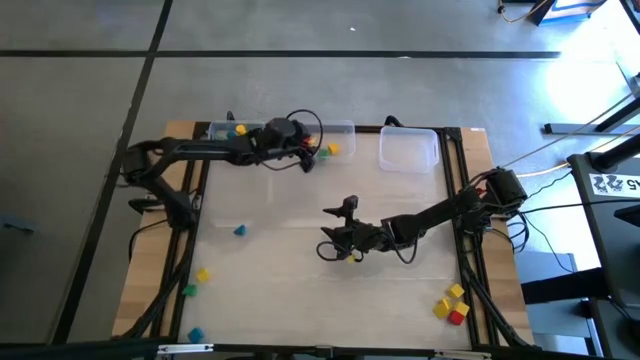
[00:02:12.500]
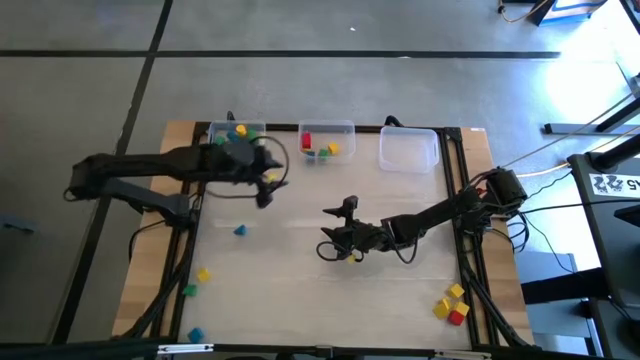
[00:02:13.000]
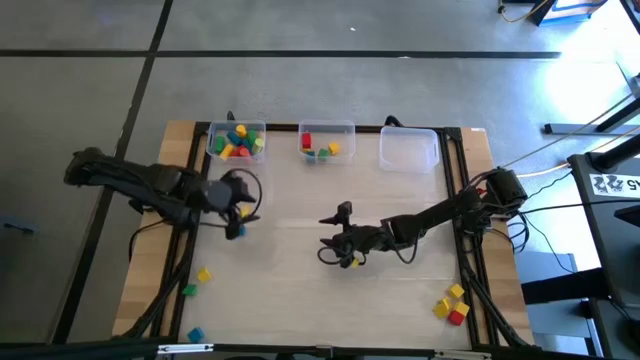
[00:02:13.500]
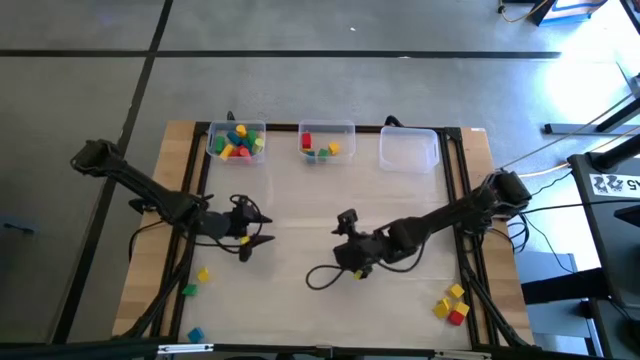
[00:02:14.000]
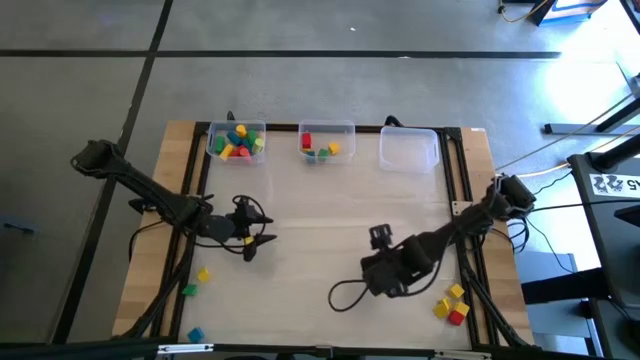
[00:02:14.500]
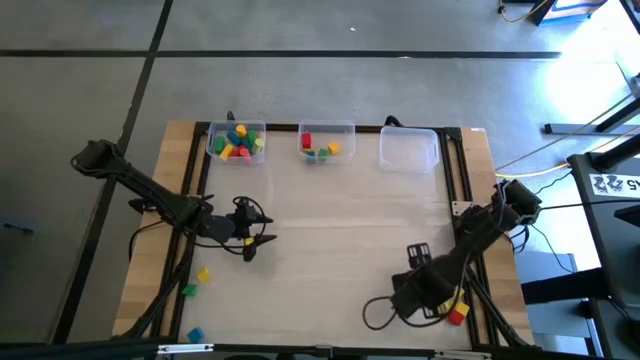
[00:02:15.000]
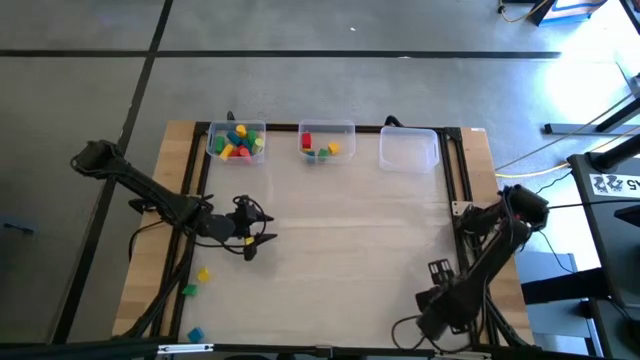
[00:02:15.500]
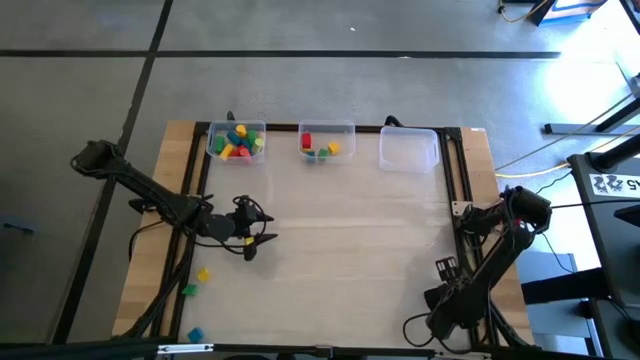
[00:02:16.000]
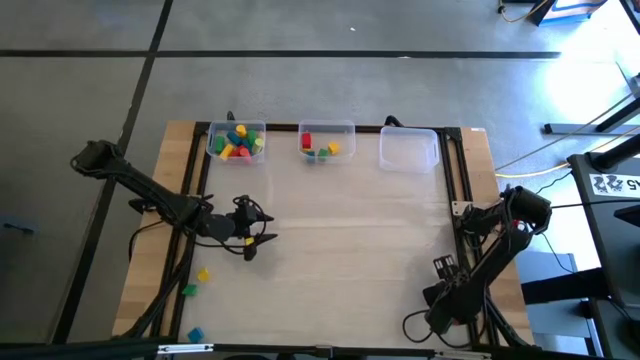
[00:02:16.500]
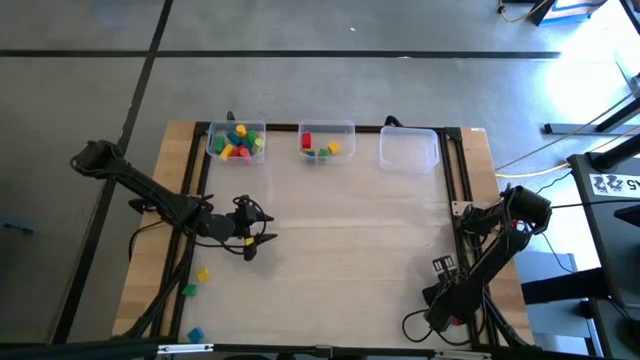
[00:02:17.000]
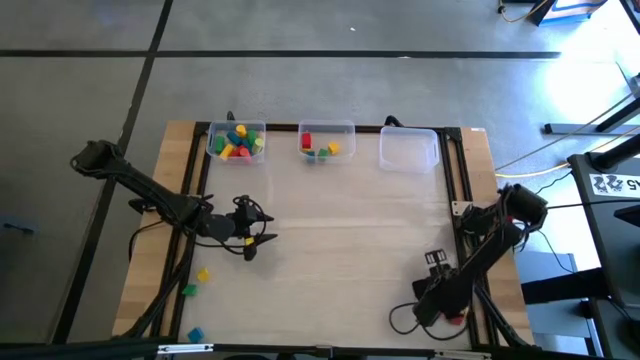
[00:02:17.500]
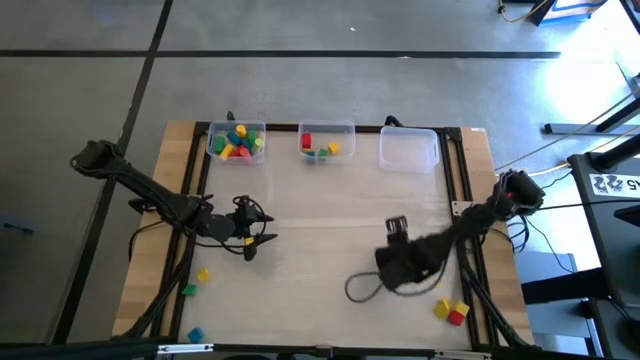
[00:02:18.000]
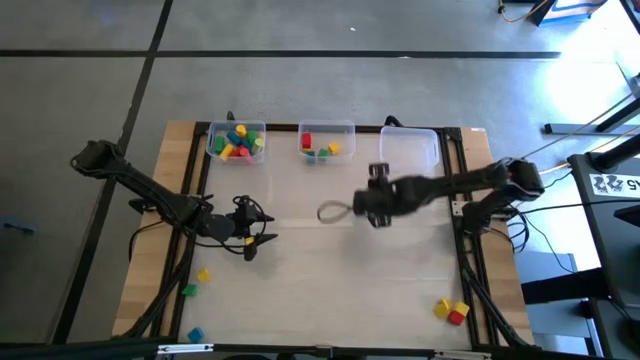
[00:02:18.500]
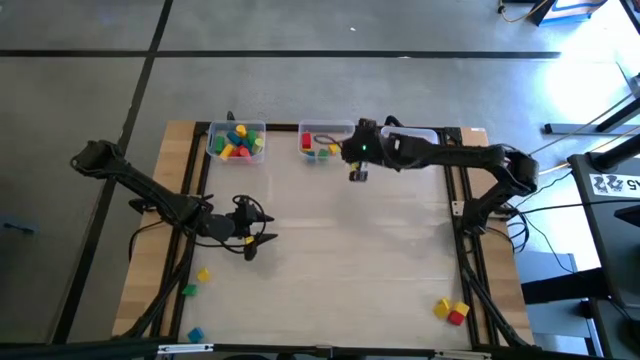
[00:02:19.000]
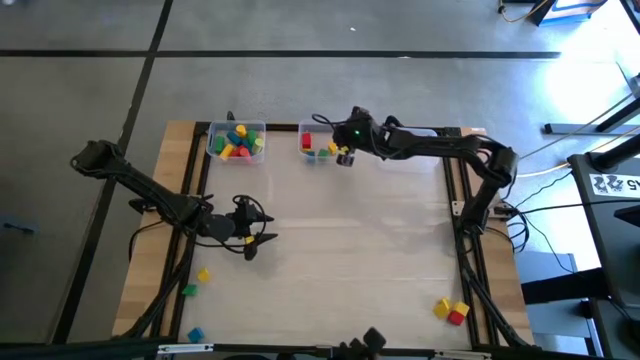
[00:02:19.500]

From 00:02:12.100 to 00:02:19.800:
Task: Sort blocks by size
Put the square yellow block into the middle transparent bin

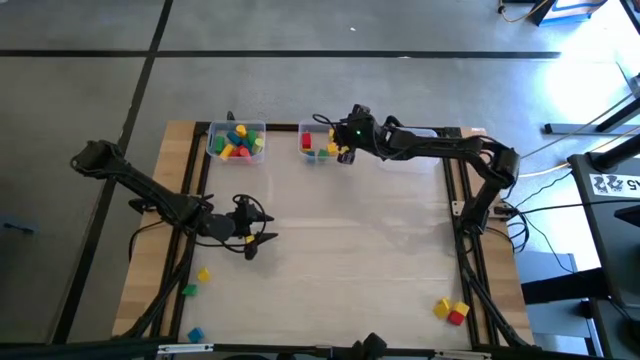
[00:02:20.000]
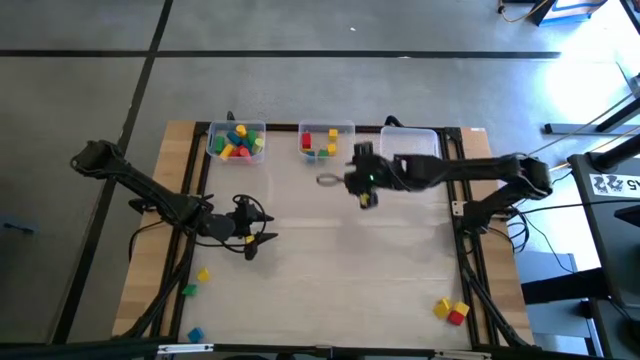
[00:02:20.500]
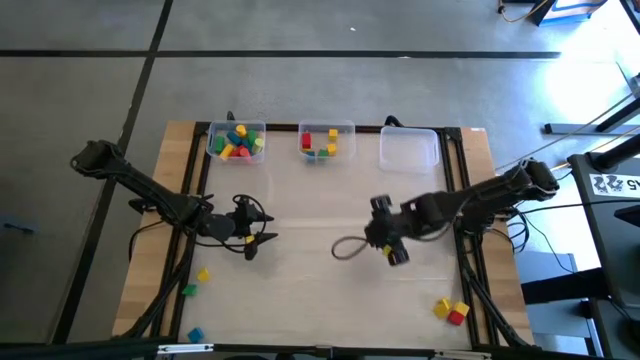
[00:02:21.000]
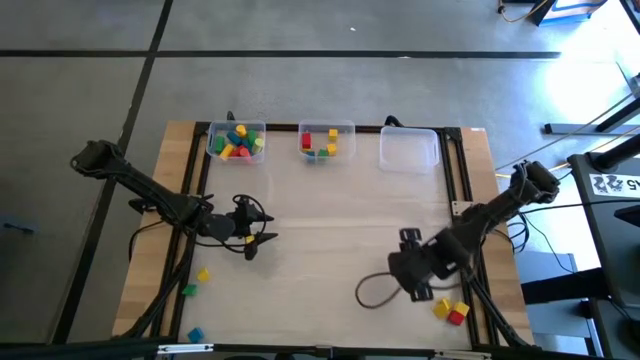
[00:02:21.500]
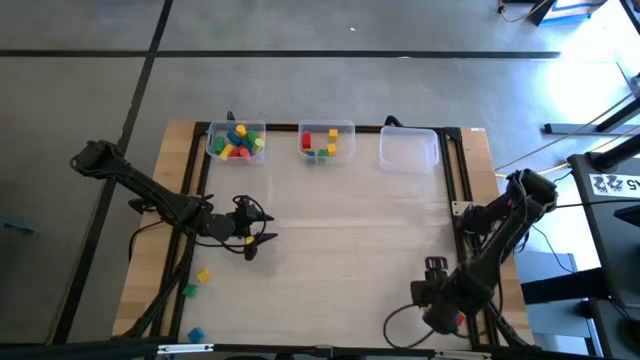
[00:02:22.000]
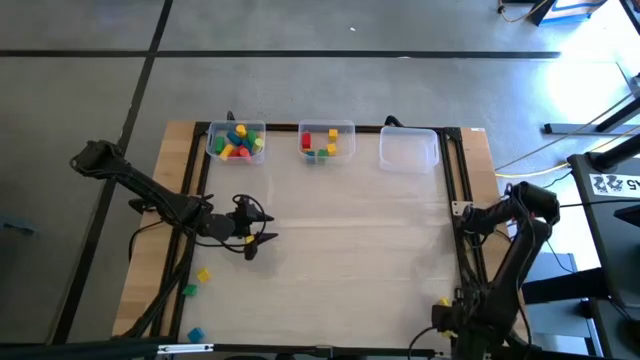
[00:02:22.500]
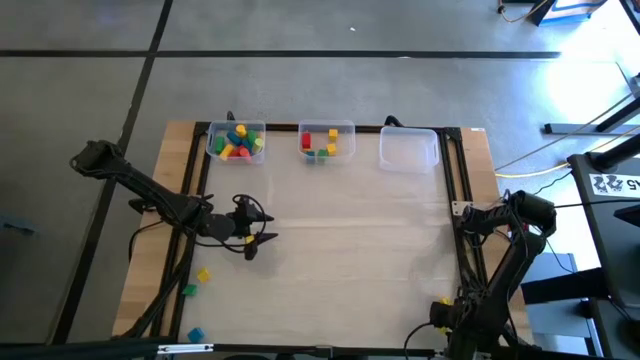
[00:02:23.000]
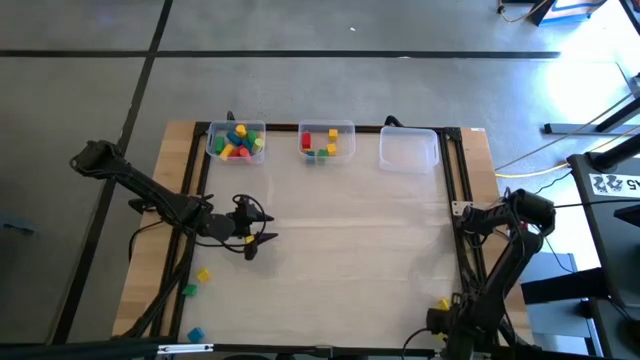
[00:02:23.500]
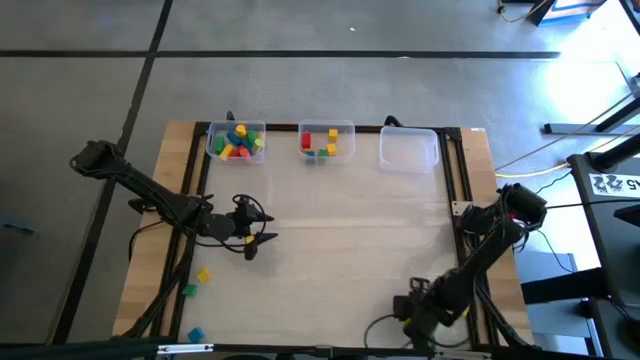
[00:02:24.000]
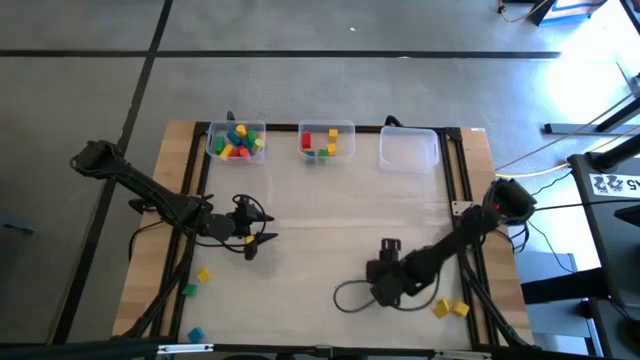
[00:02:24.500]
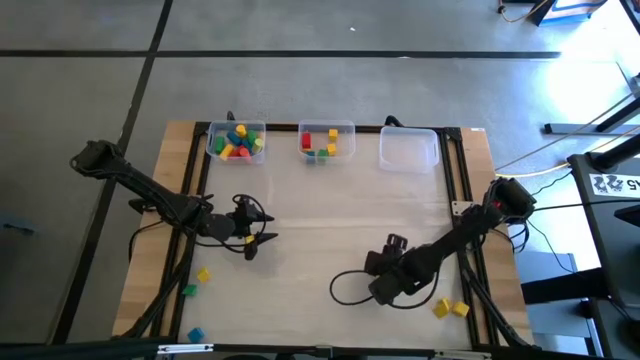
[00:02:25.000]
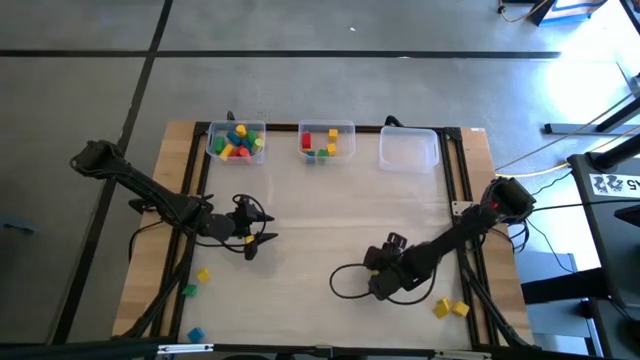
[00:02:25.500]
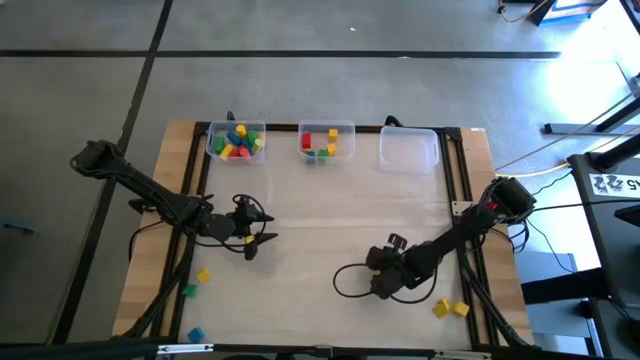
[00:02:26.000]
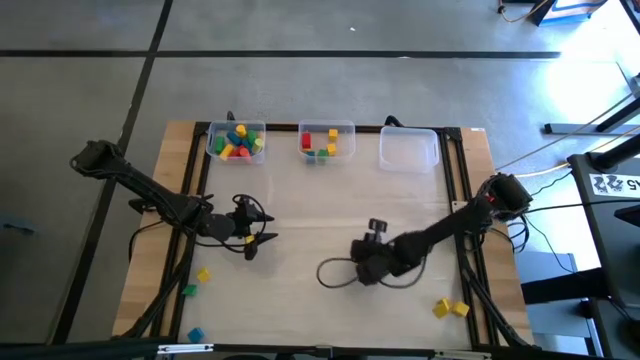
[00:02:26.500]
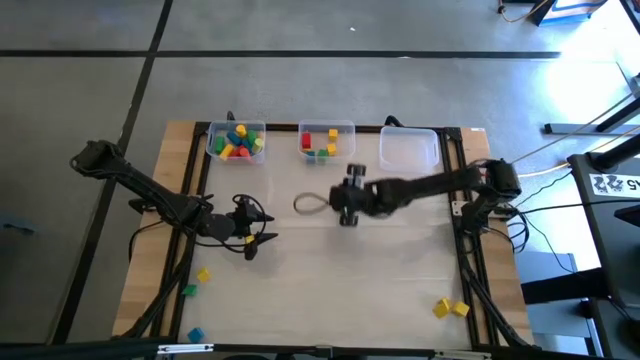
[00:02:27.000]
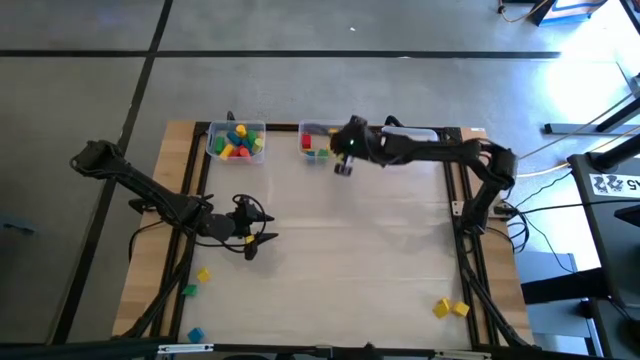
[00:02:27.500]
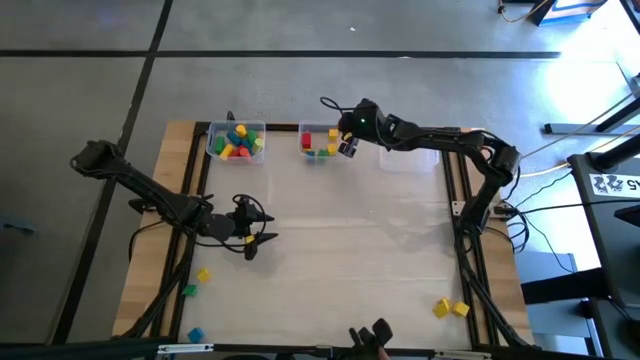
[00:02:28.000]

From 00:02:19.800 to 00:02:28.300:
Put the square red block into the middle transparent bin

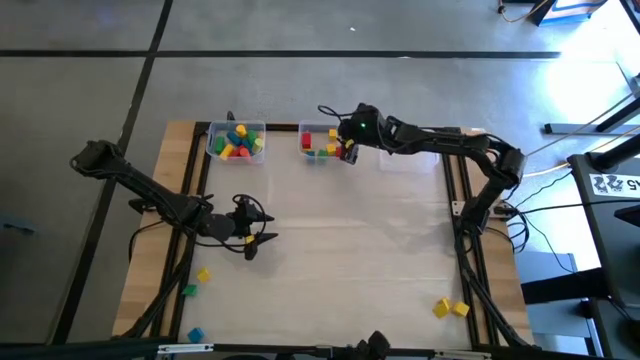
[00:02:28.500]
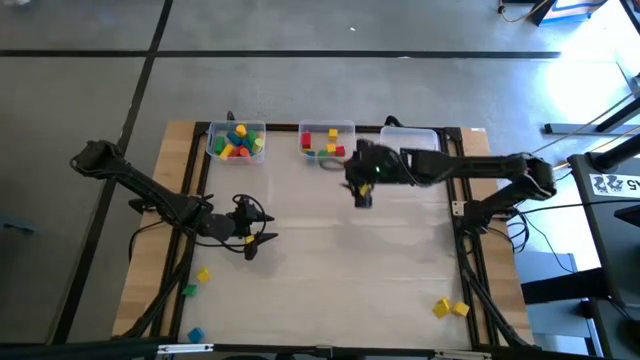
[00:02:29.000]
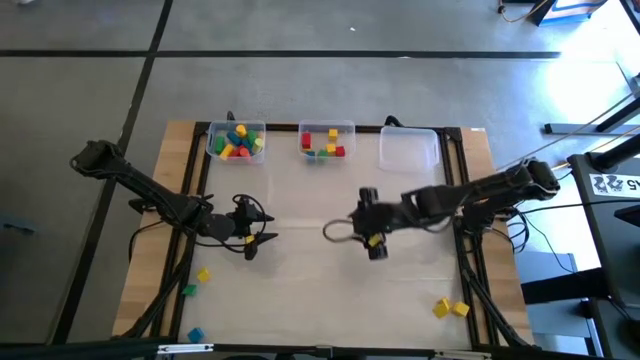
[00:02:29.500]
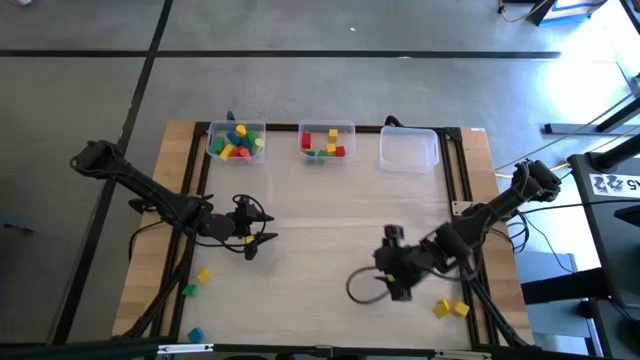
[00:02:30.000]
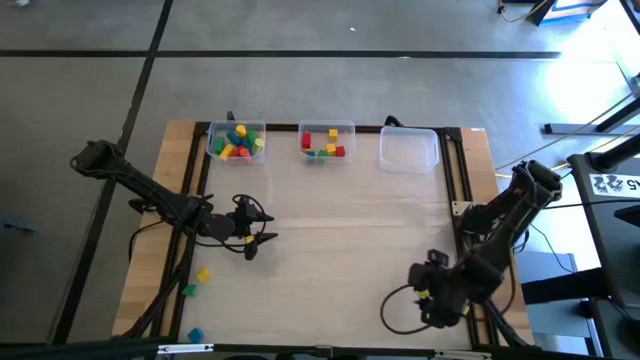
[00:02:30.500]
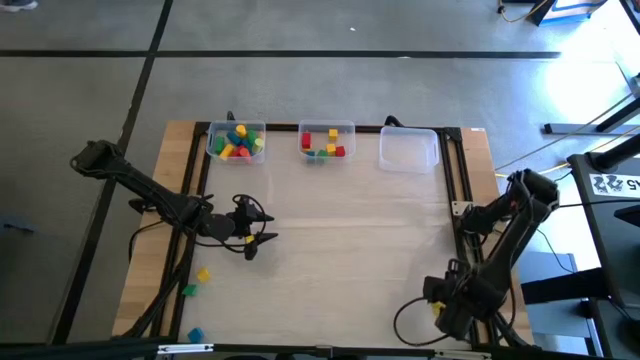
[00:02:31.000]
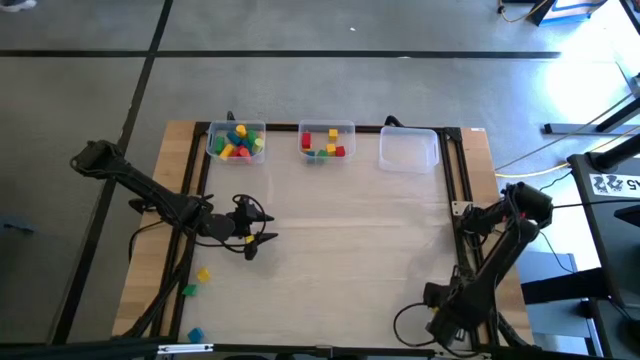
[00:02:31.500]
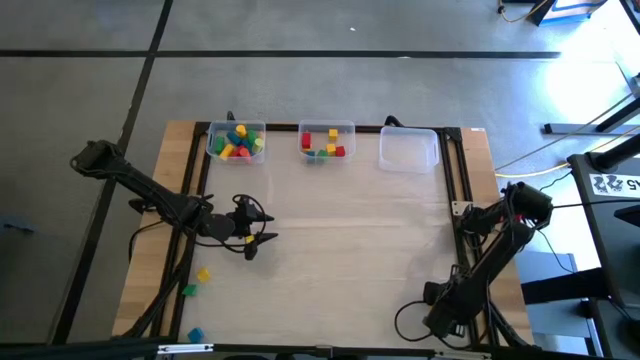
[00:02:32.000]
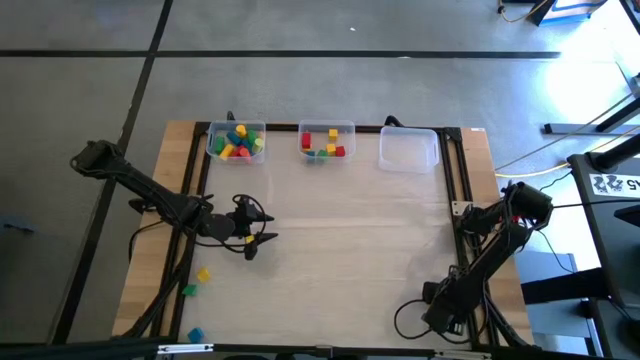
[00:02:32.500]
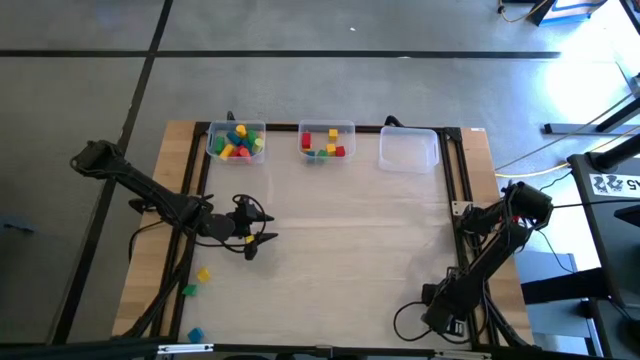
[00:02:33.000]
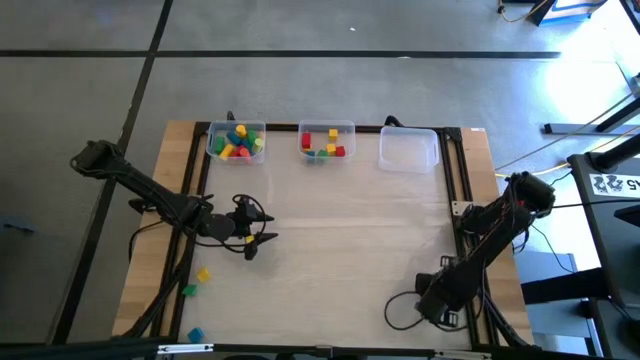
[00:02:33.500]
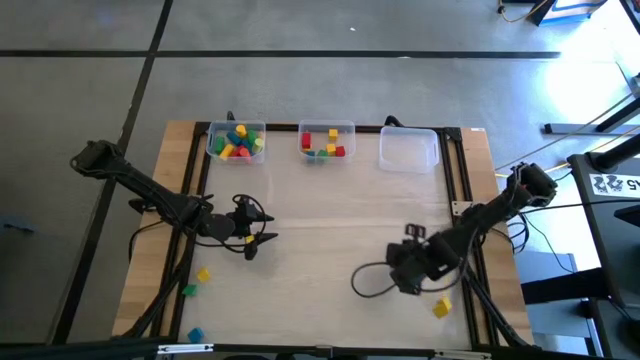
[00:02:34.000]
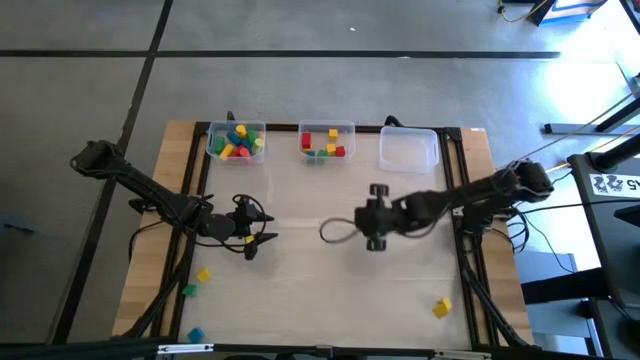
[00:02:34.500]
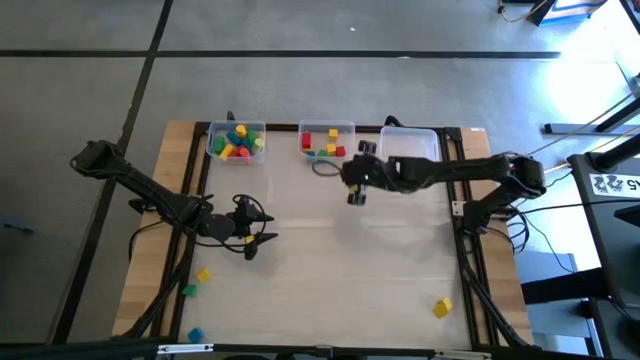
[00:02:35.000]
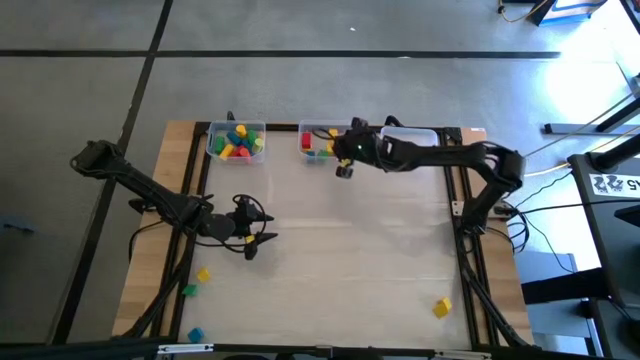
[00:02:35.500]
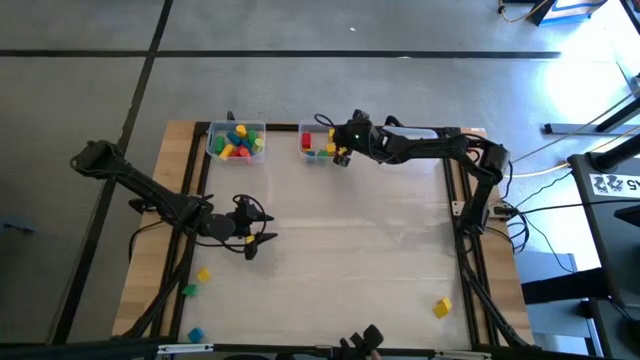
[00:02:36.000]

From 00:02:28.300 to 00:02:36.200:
Put the square yellow block into the middle transparent bin
